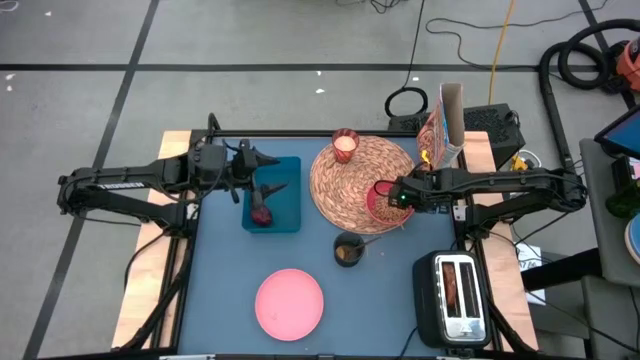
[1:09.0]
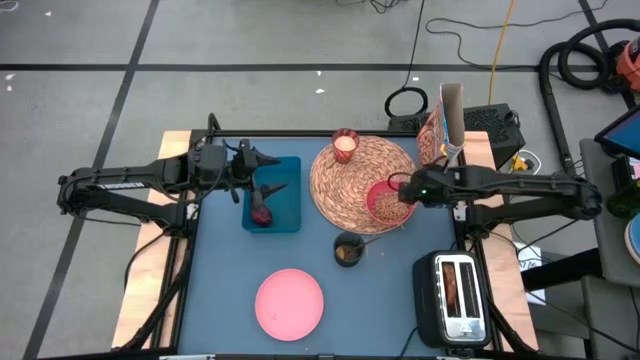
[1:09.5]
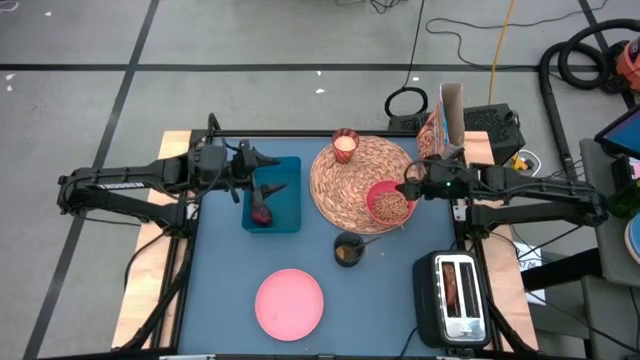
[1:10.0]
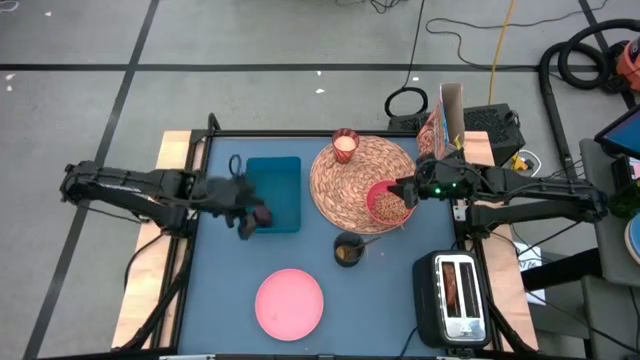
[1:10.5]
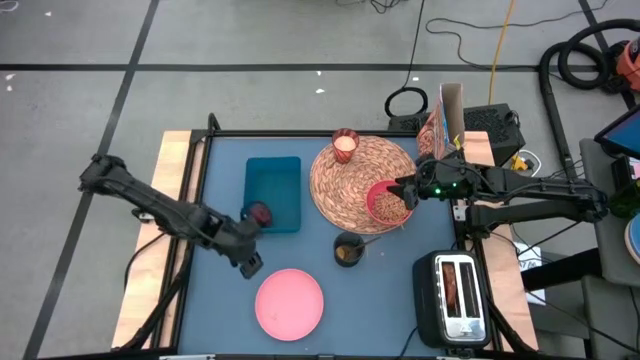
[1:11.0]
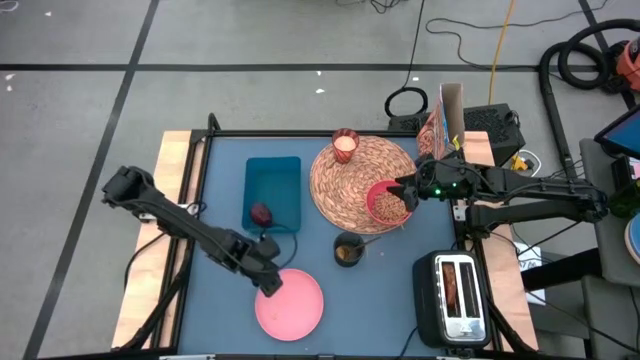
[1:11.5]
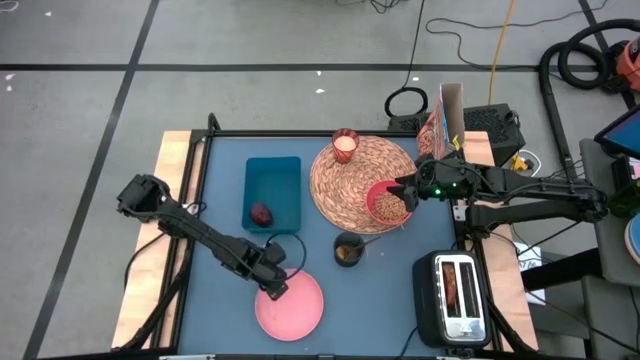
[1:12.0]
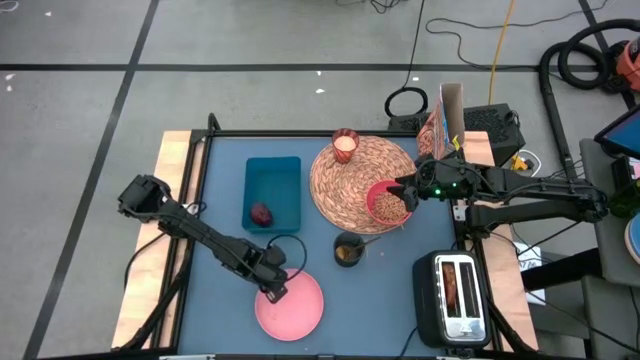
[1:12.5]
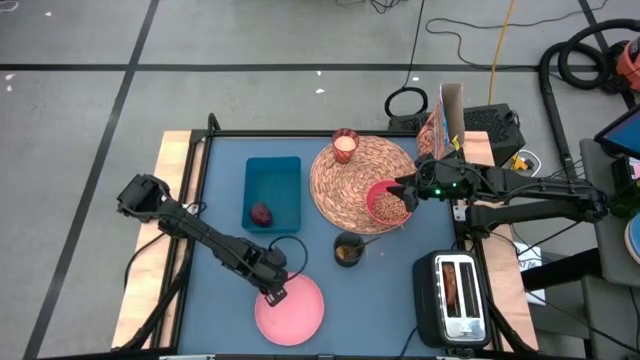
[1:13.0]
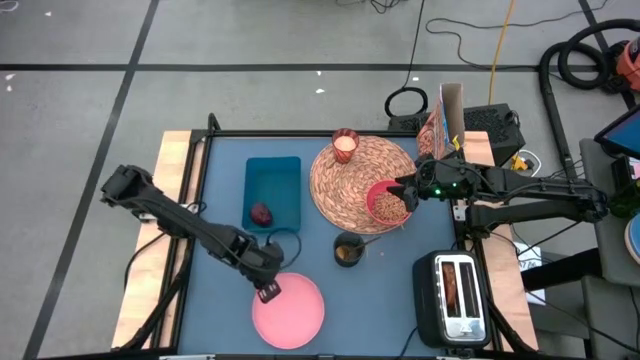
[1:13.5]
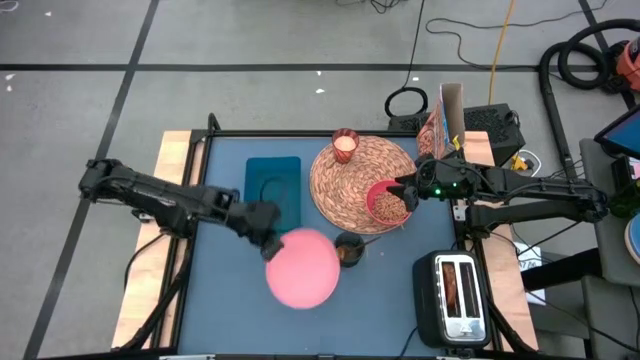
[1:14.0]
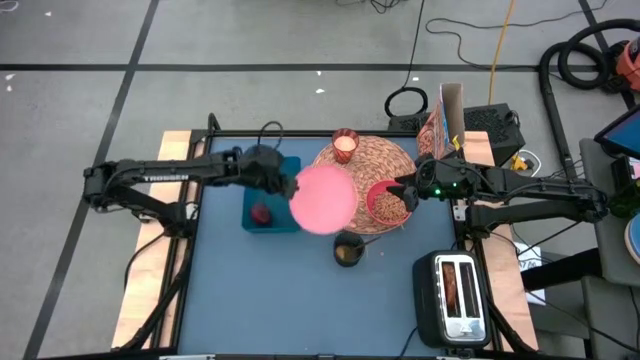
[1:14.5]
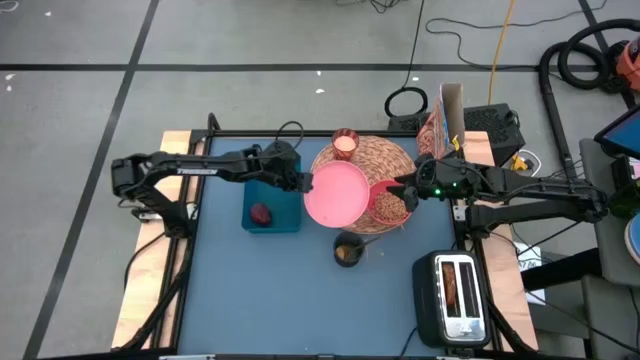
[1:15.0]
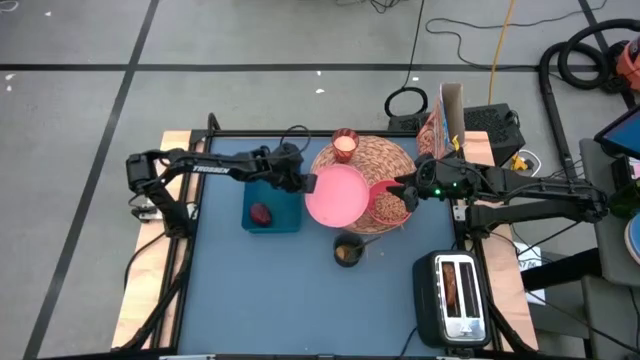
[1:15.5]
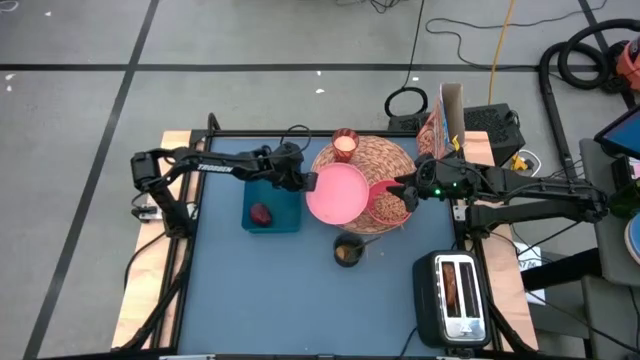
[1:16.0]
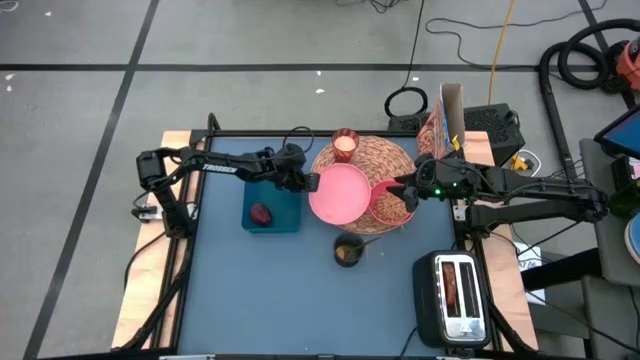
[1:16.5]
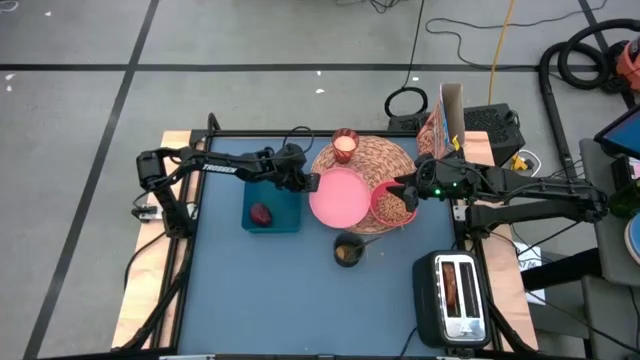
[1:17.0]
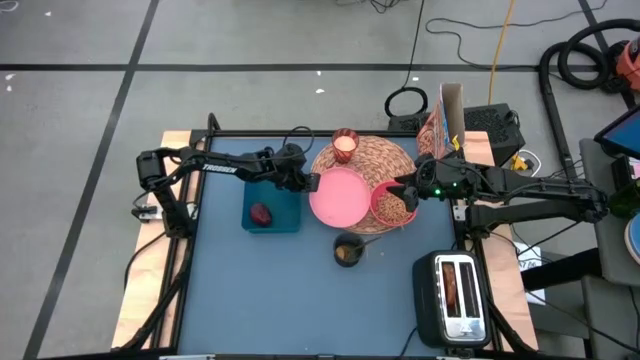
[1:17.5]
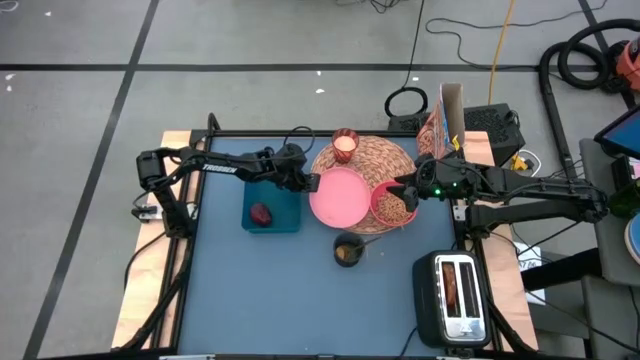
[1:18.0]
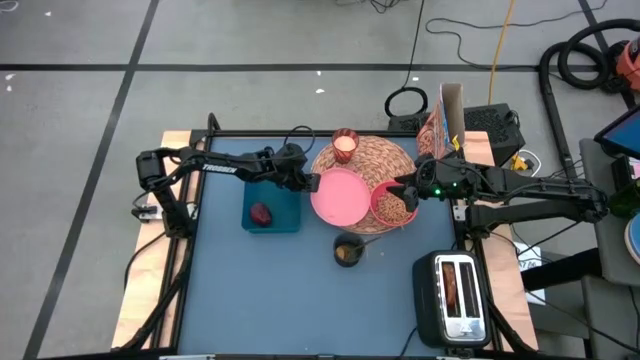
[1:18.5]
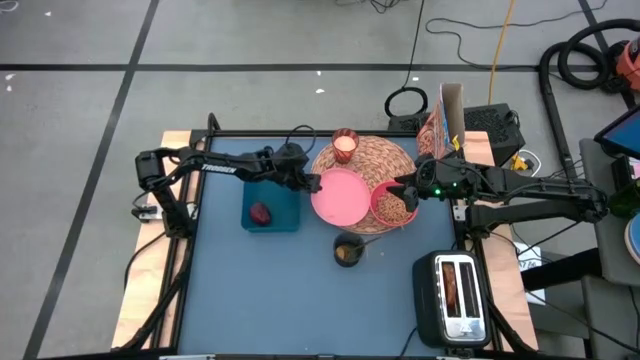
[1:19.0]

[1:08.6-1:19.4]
Task: Arrange a breakfast setting
Put the pink plate to the left side of the pink bowl on the brown placemat

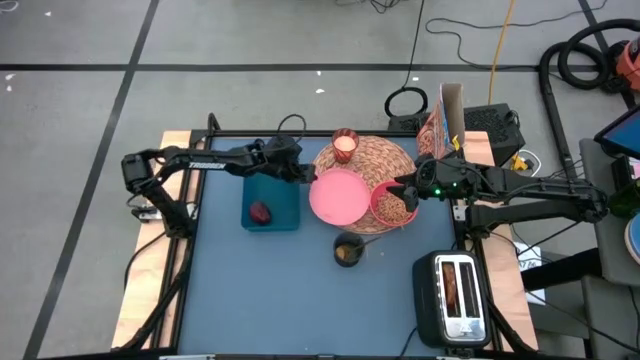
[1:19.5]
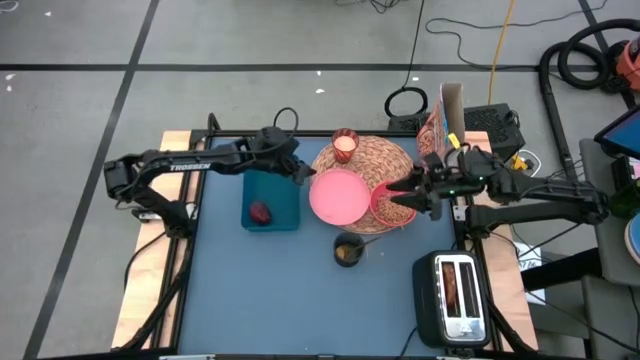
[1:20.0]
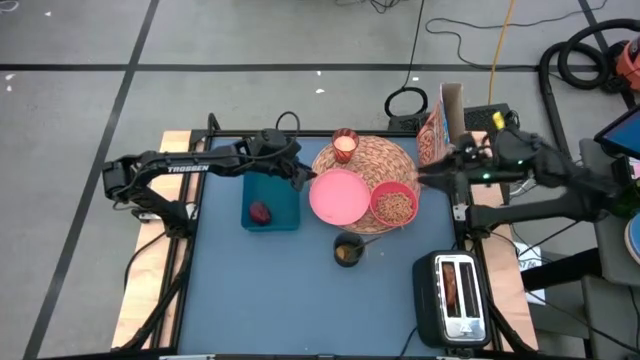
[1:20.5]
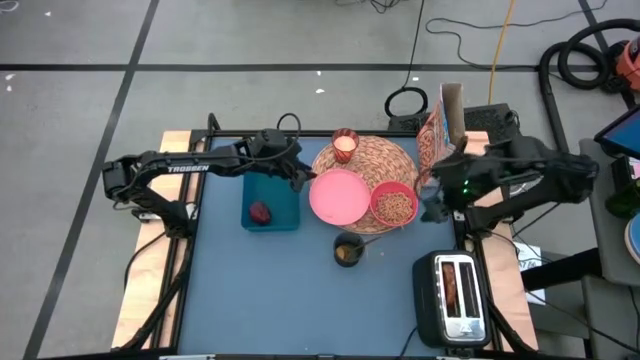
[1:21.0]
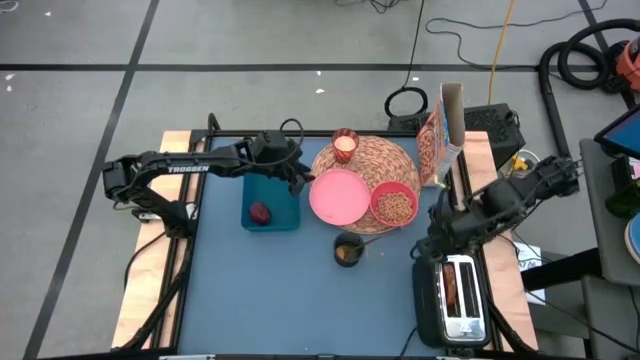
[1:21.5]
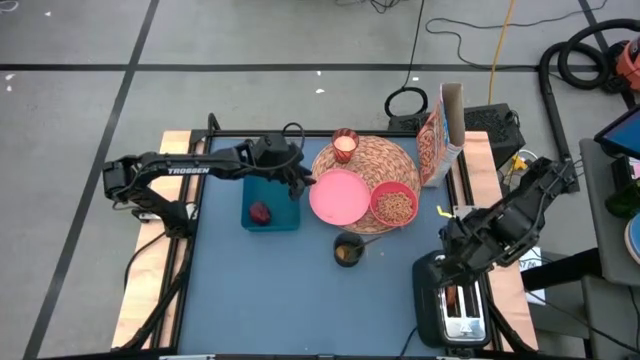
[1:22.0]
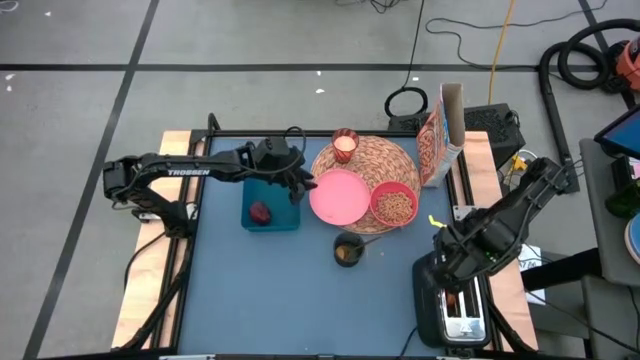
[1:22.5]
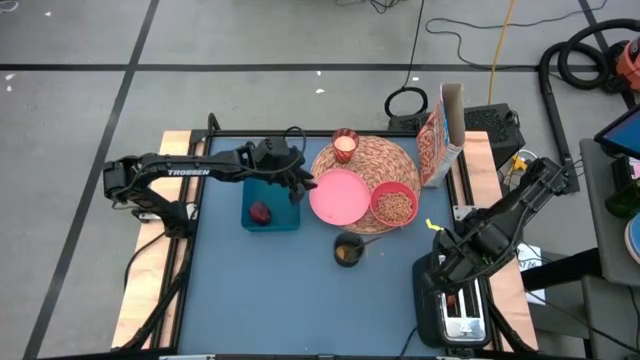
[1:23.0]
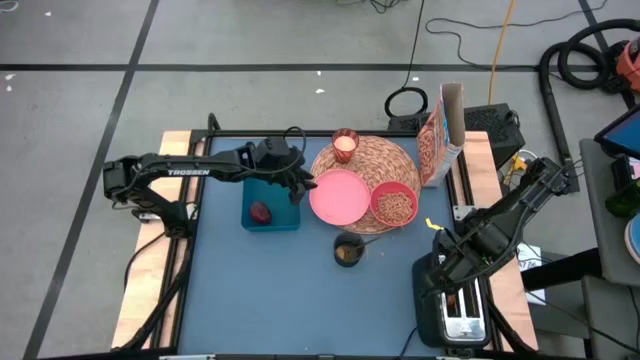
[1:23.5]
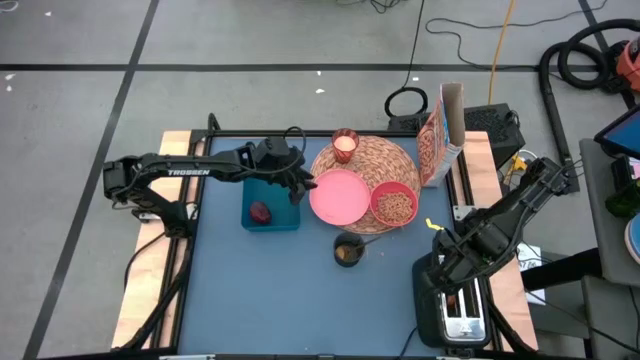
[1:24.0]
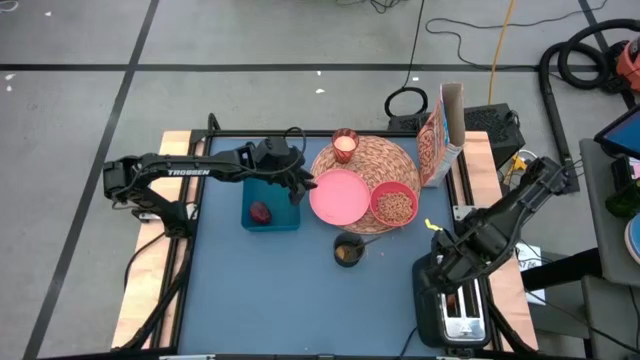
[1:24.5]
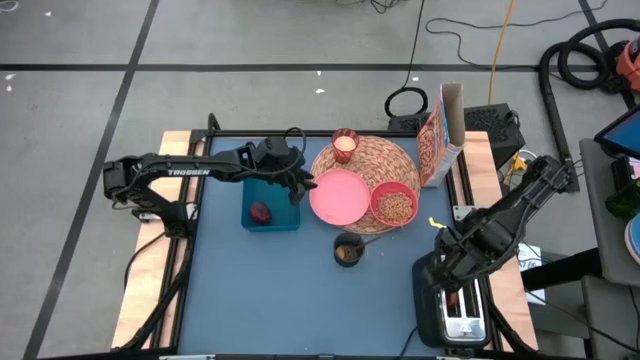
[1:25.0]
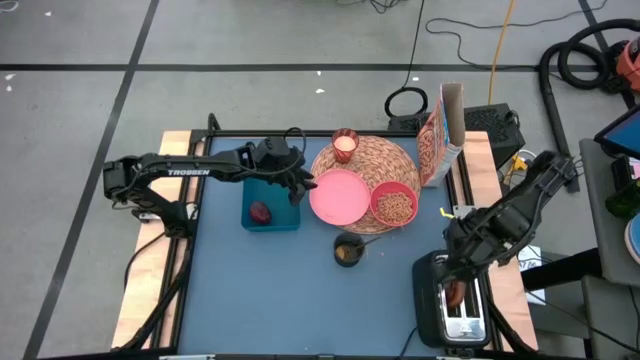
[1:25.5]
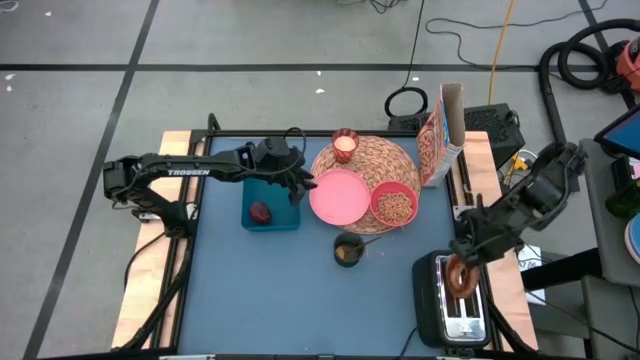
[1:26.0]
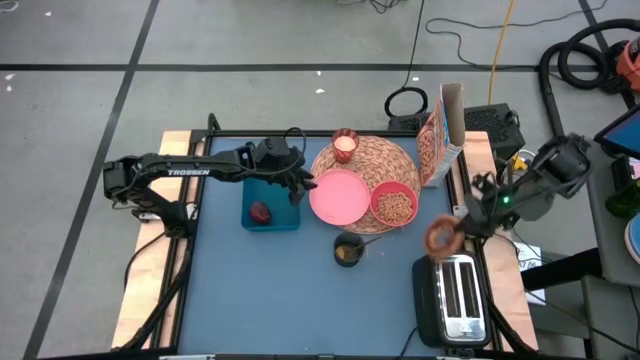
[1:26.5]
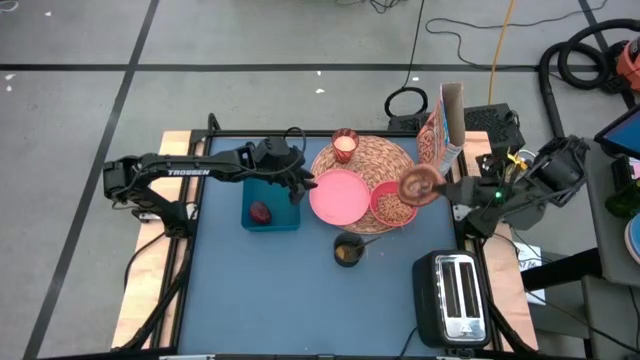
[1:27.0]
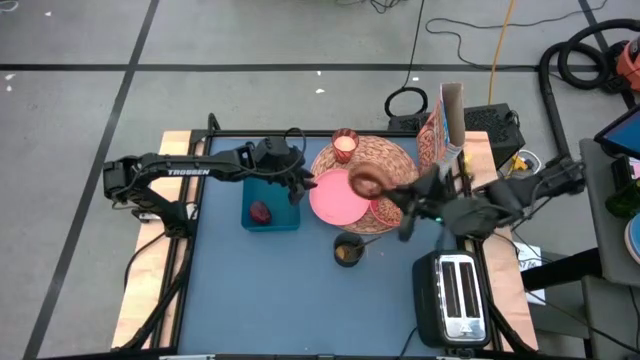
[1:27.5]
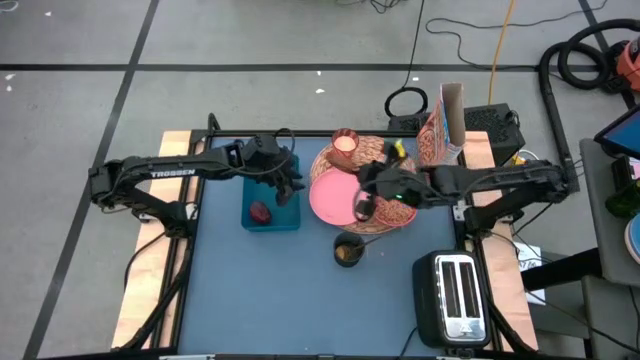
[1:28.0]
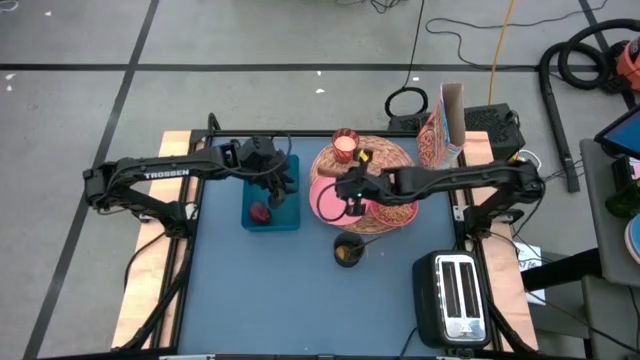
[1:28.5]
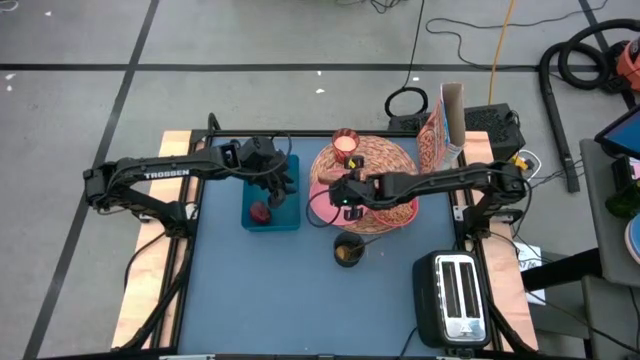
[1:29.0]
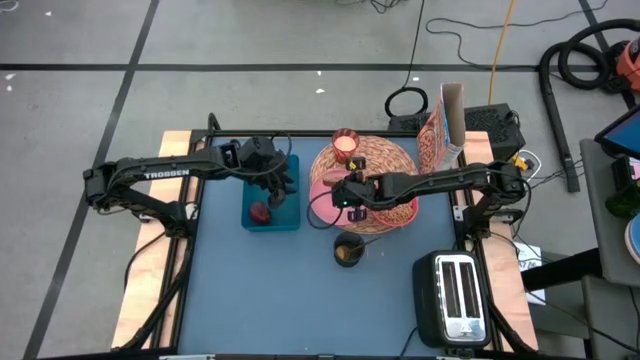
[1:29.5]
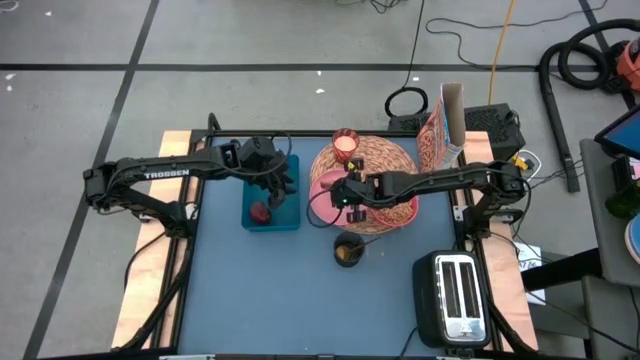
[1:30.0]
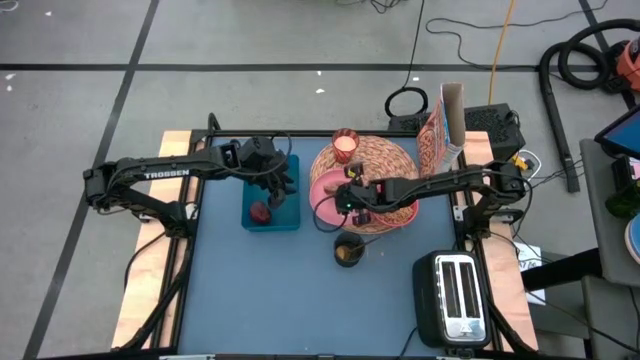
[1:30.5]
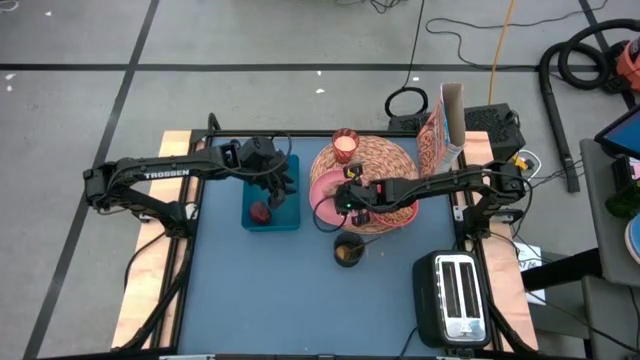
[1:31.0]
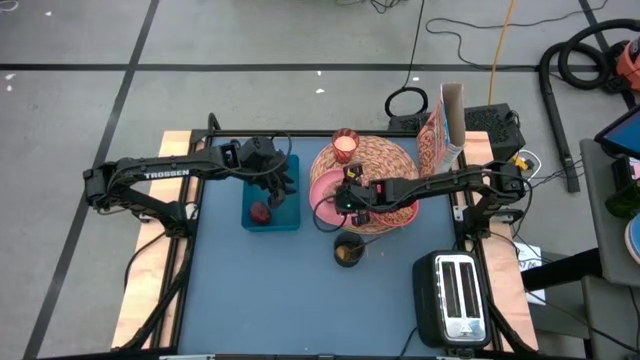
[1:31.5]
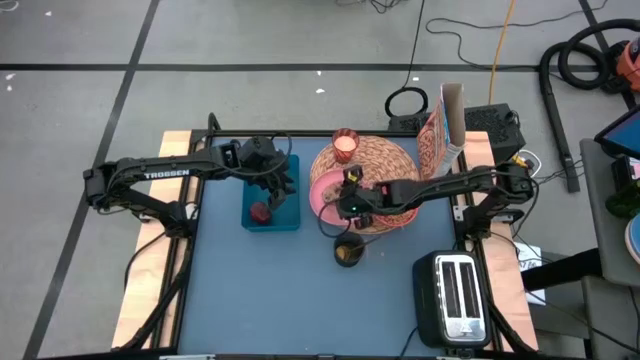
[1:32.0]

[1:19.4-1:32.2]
Put the bagel bread into the light pink plate
